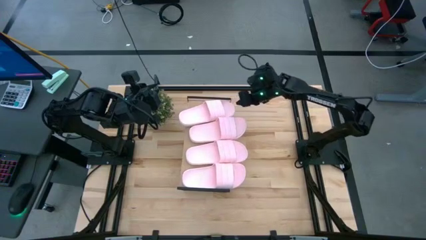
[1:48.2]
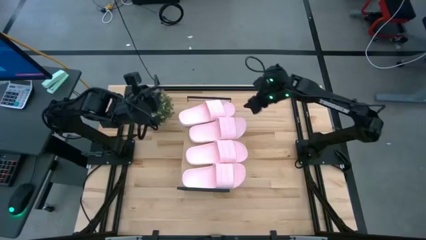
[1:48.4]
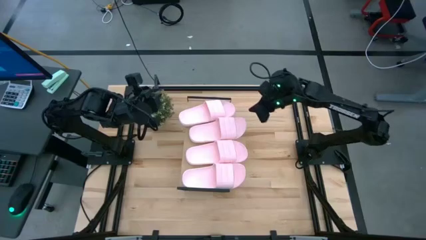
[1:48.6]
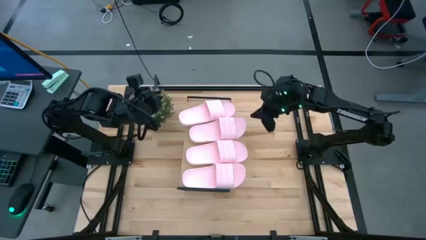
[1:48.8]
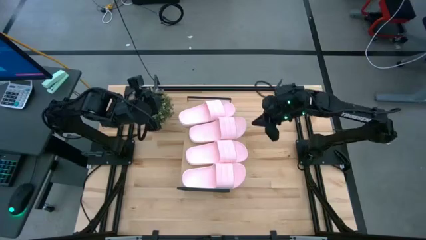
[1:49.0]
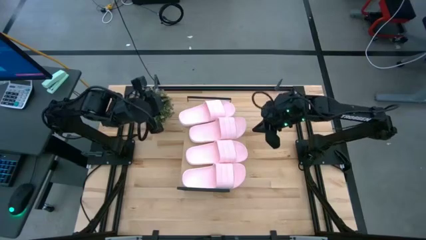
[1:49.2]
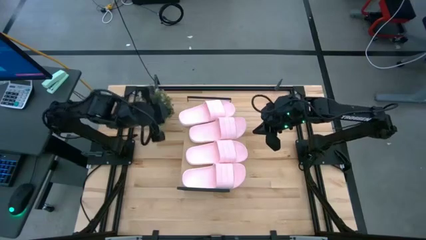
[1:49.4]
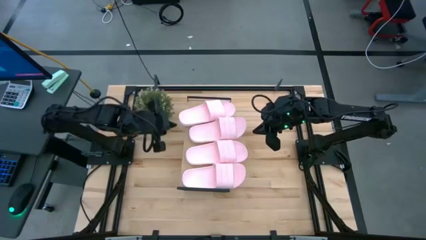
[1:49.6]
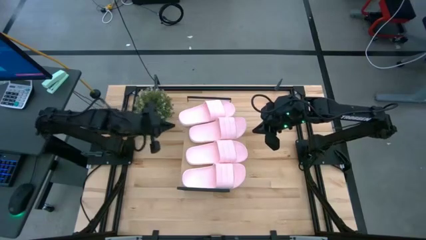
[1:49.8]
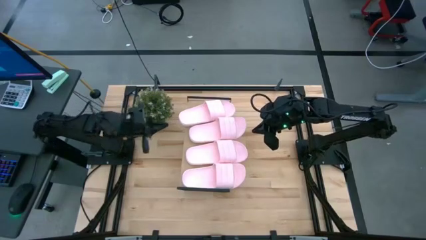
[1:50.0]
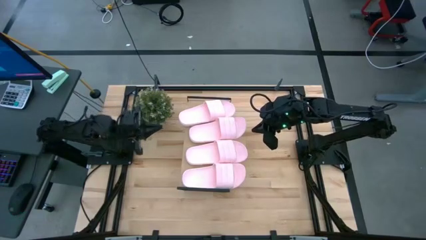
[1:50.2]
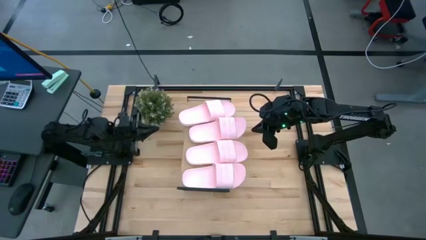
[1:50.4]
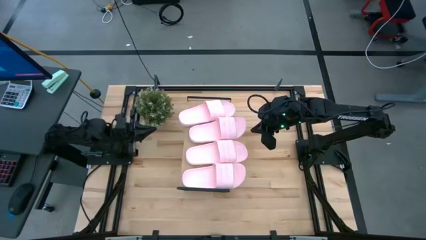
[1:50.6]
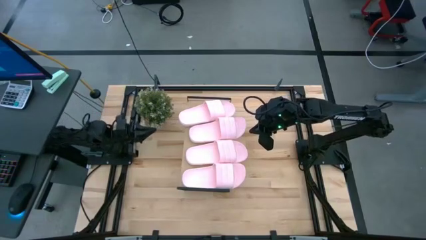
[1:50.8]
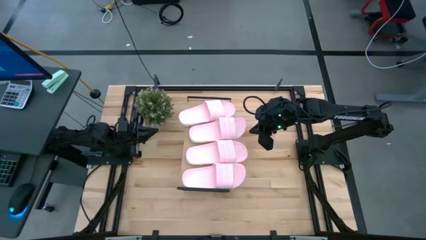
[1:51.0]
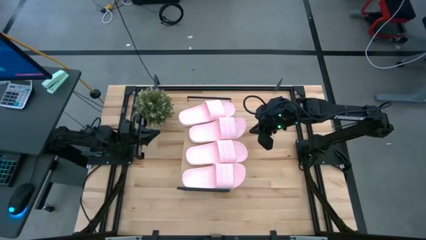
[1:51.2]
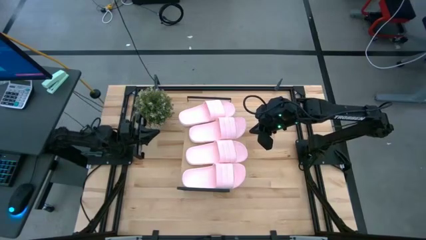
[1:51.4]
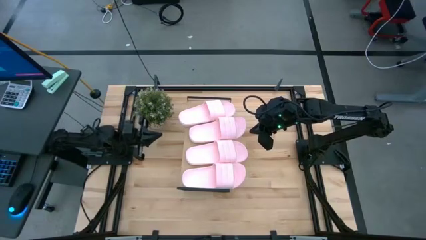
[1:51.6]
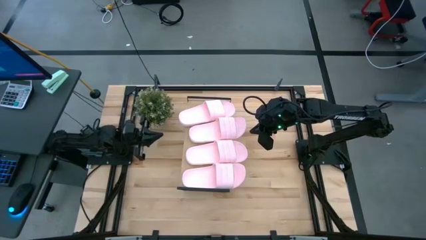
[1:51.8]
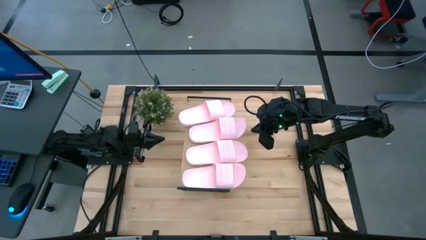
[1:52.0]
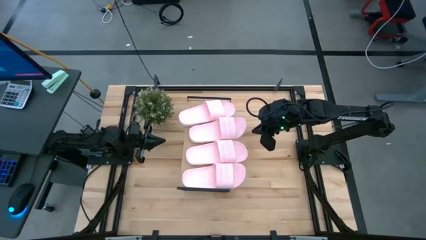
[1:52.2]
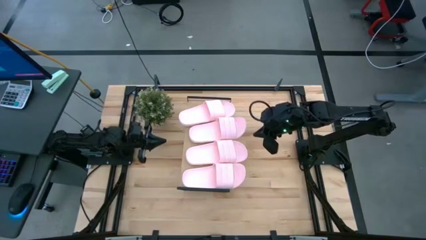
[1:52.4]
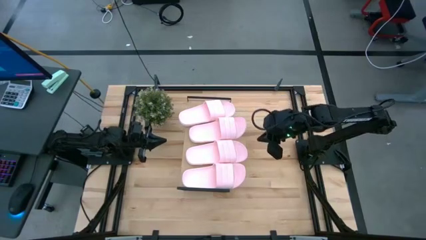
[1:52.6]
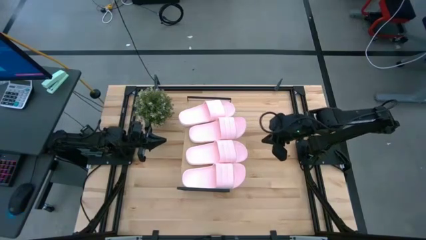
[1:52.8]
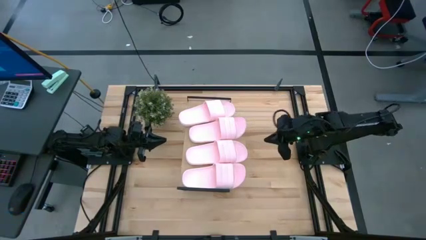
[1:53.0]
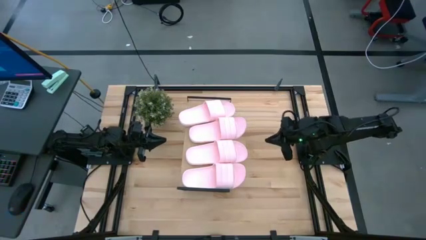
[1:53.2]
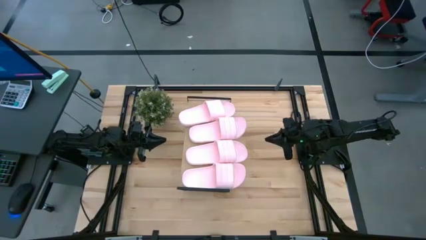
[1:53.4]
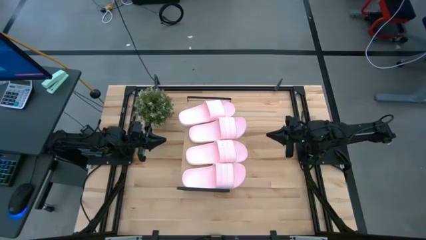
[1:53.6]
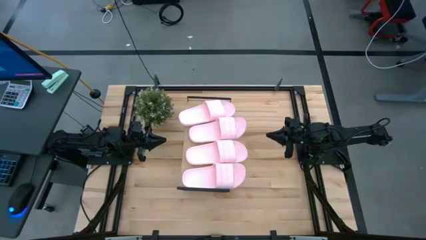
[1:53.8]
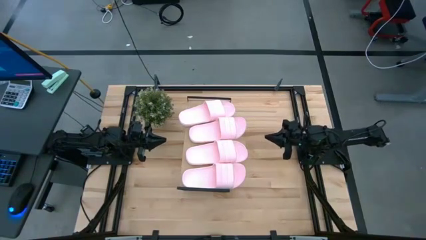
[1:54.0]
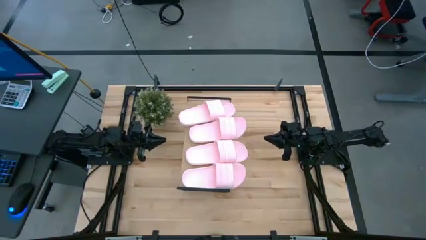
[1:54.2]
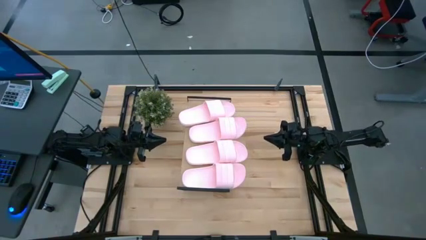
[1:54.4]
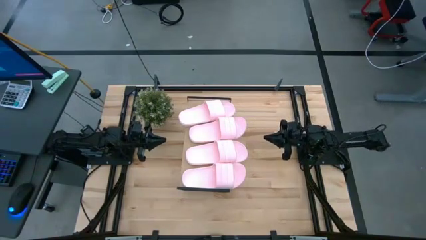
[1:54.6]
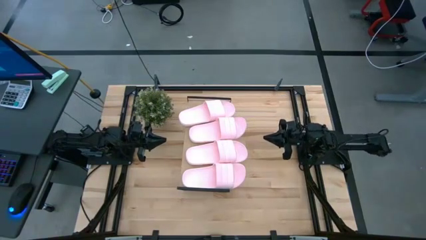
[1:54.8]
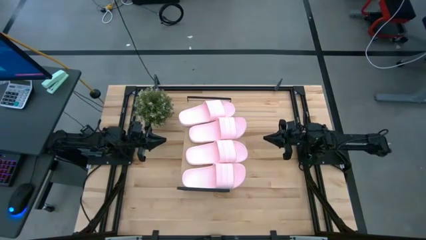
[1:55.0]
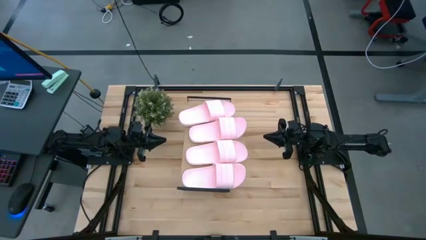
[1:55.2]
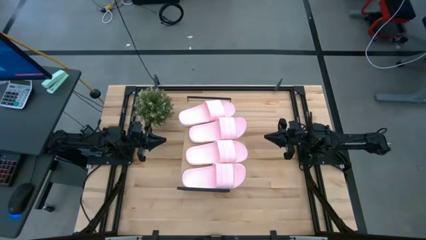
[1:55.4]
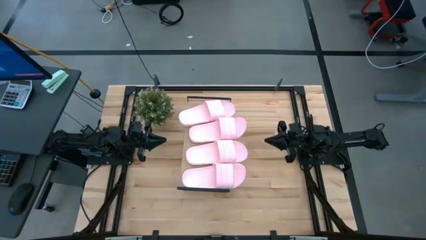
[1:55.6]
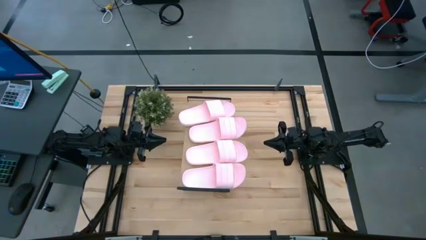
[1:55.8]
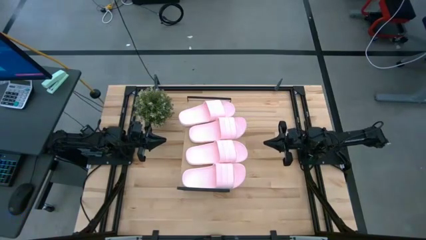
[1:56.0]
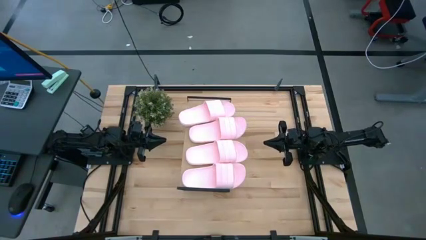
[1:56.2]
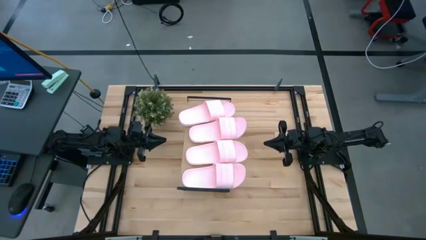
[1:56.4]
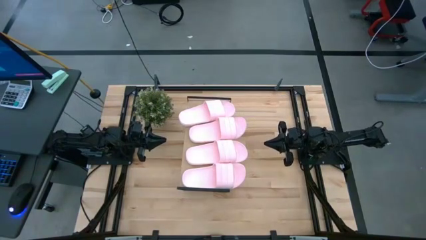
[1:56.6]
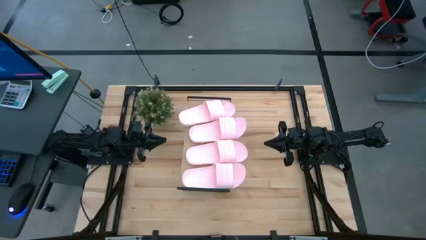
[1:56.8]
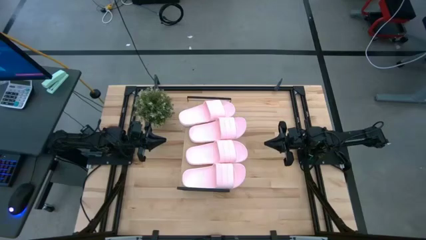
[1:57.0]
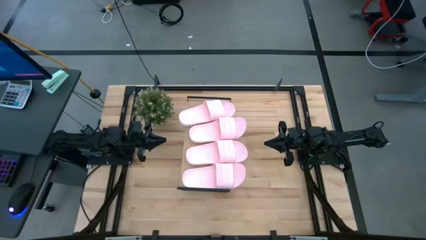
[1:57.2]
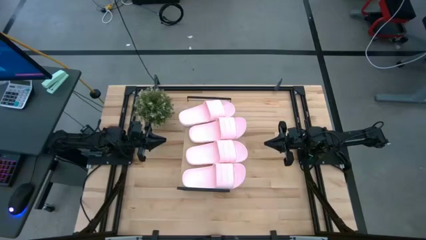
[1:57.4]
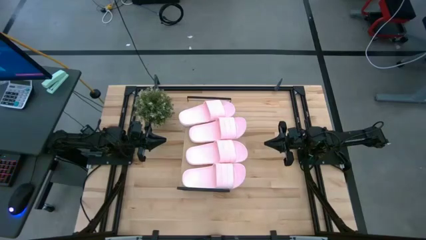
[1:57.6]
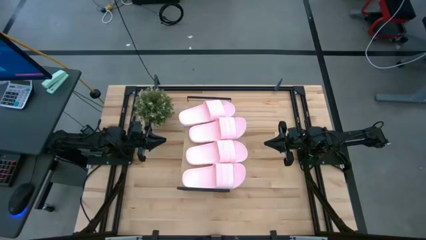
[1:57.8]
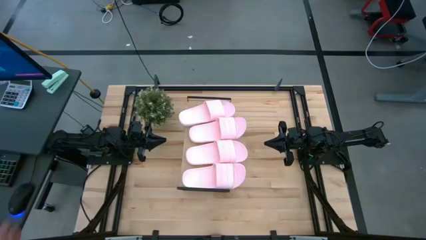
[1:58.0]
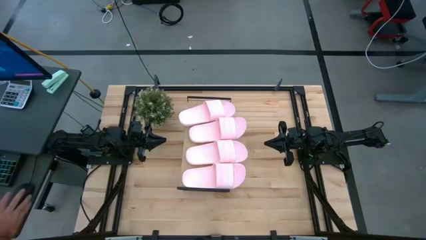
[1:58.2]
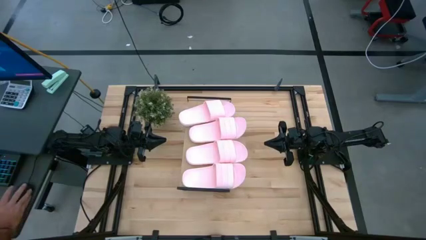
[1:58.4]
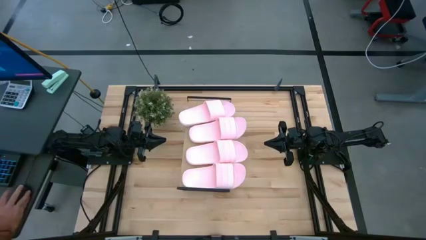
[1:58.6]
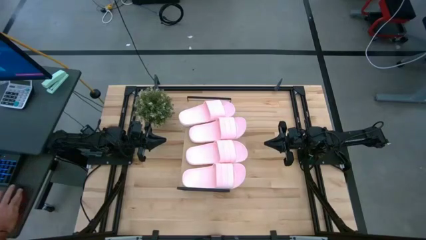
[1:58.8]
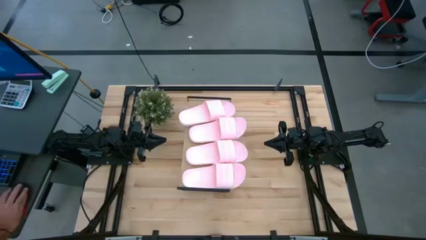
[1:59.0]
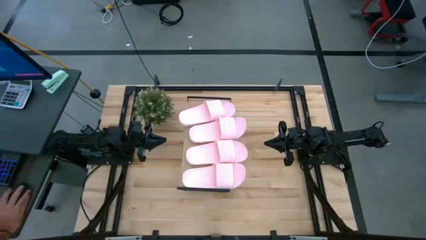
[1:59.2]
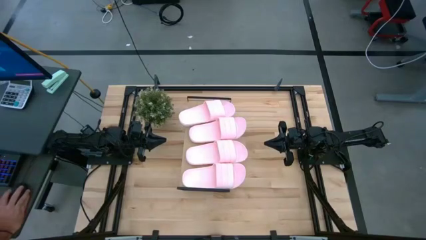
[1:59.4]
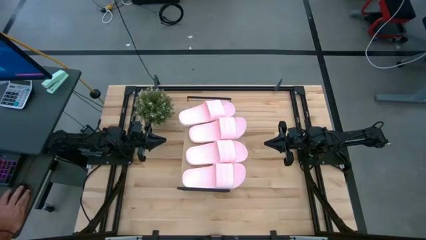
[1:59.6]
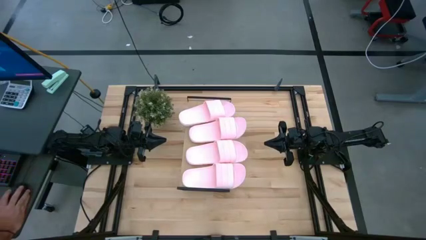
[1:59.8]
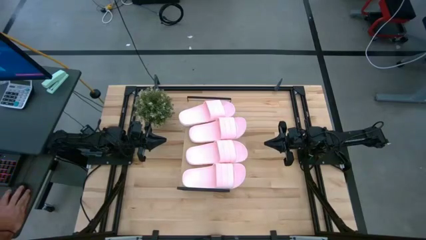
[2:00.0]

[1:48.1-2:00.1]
Task: Pick and place slides into the shelf
Return to Home Position

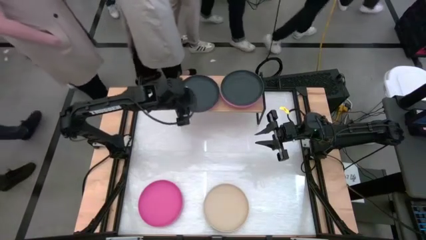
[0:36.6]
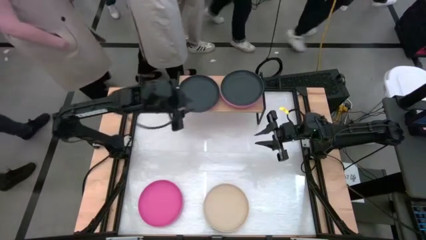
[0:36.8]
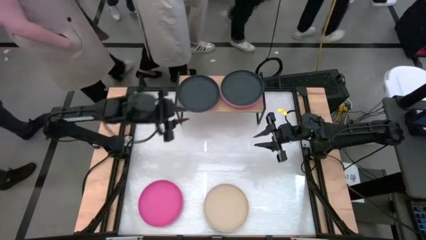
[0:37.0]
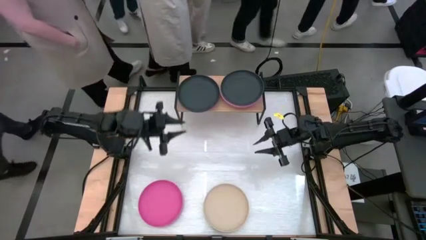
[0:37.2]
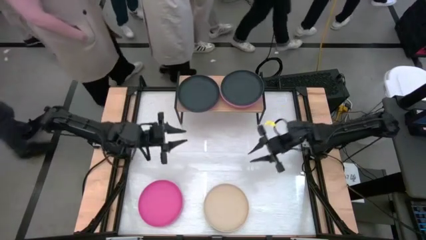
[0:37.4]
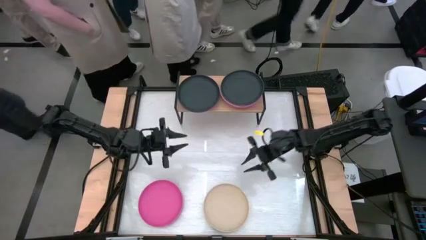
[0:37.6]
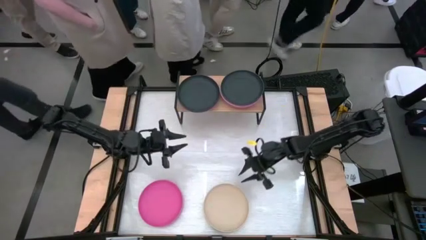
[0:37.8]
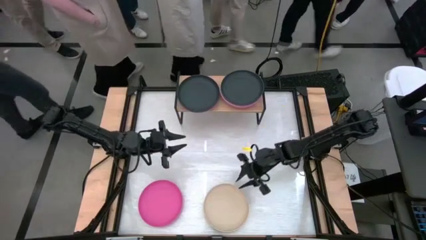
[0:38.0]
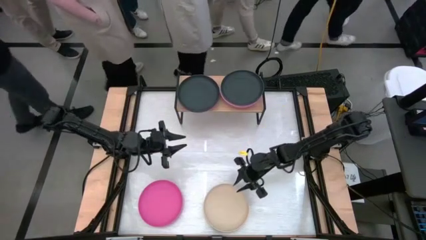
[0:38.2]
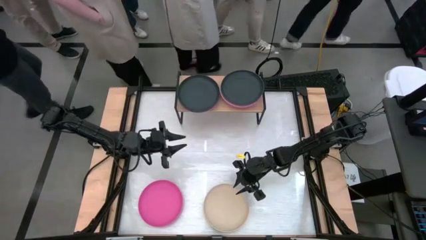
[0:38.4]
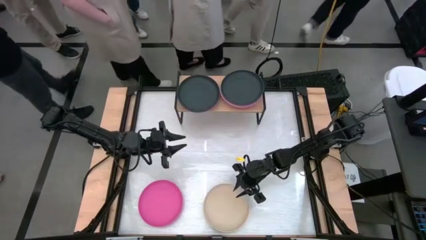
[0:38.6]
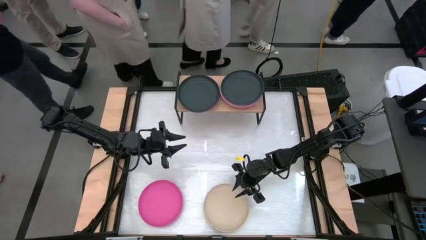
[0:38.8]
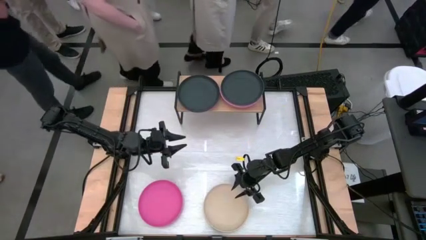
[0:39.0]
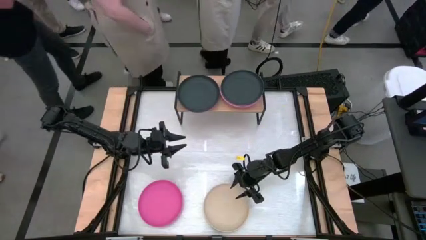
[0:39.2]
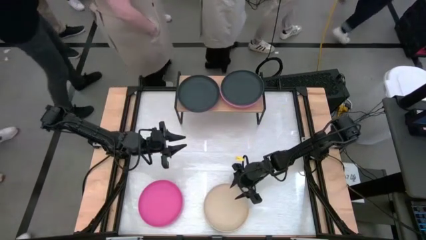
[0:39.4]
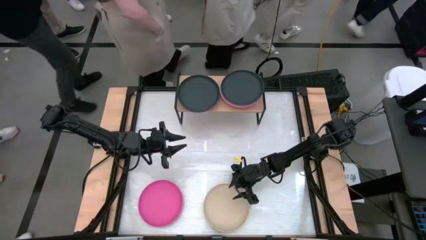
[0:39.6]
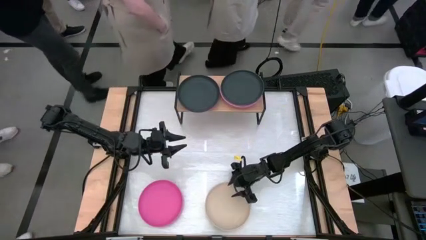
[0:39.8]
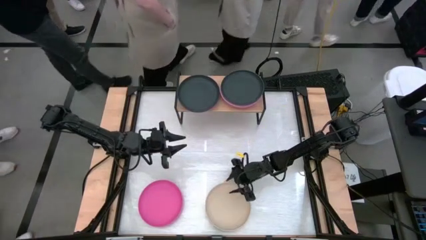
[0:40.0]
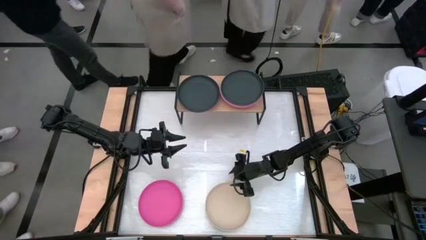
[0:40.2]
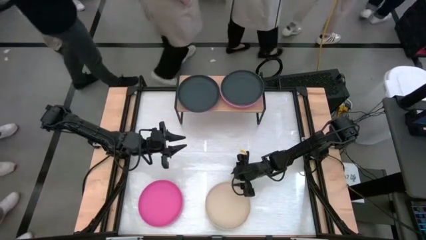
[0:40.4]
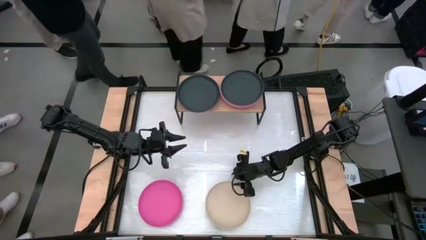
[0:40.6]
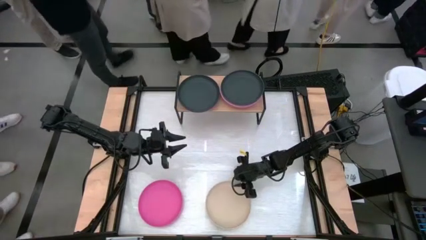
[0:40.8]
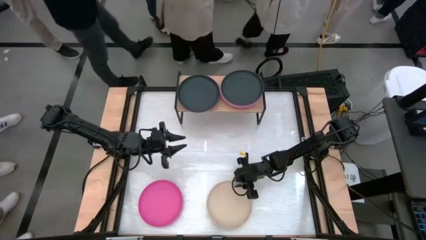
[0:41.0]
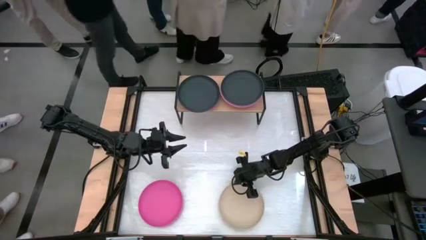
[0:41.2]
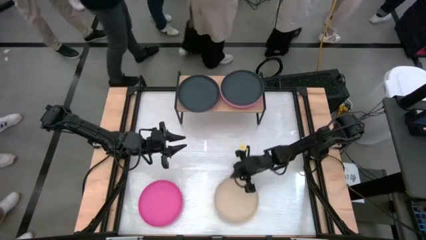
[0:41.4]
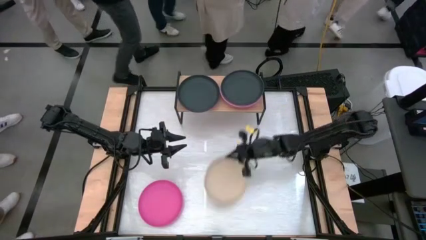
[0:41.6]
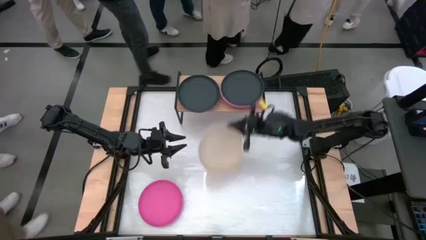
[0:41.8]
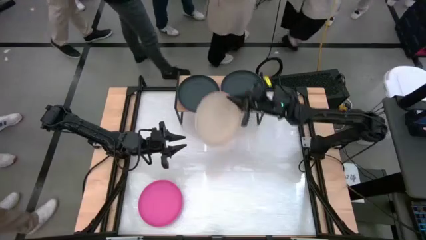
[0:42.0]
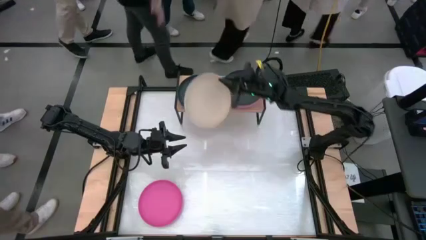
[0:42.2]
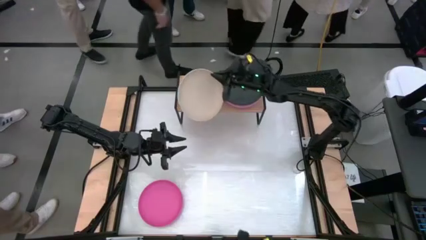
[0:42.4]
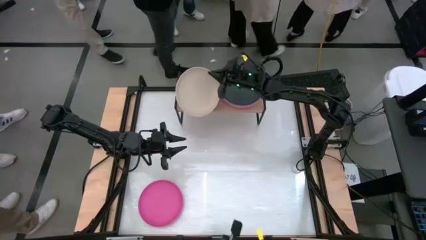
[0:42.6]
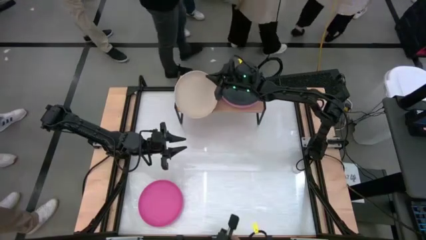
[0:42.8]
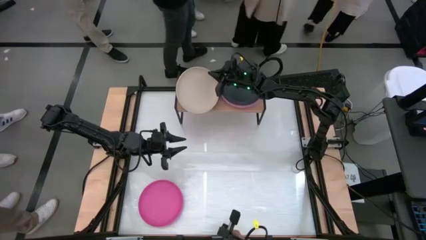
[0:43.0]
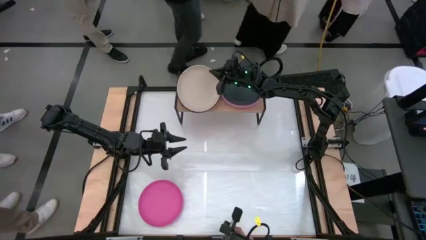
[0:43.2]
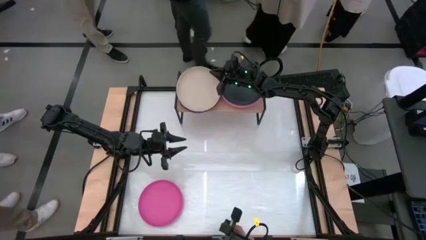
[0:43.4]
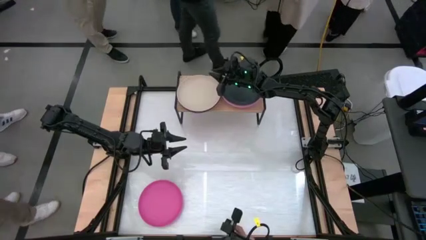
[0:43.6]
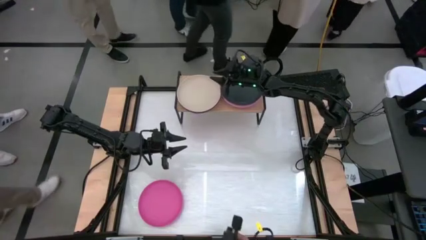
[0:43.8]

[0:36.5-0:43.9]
Task: Place and stack plates onto a shelf
Stack the white plate on top of the black plate on the shelf
